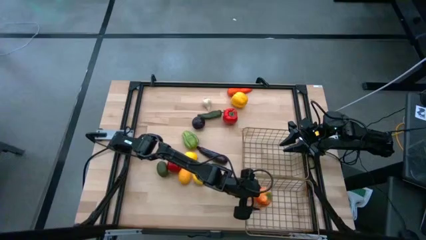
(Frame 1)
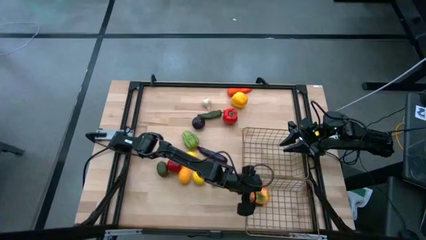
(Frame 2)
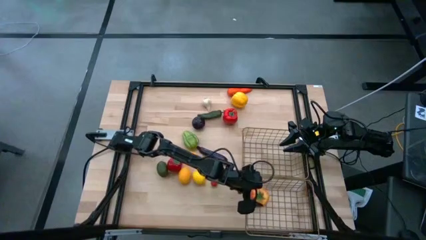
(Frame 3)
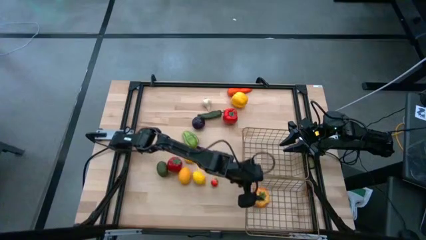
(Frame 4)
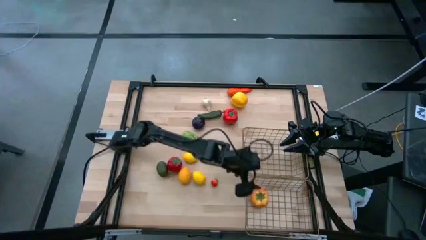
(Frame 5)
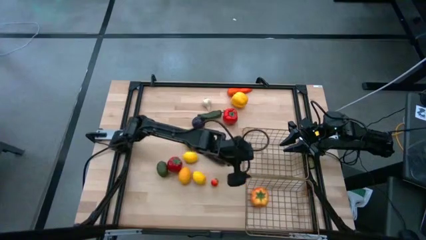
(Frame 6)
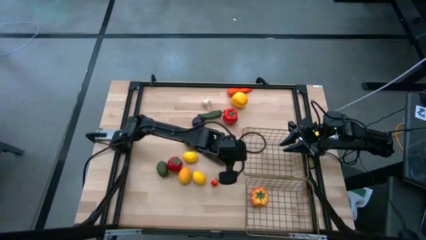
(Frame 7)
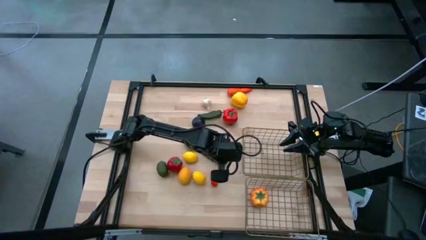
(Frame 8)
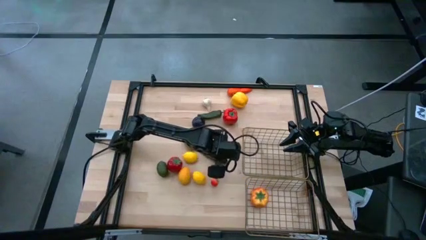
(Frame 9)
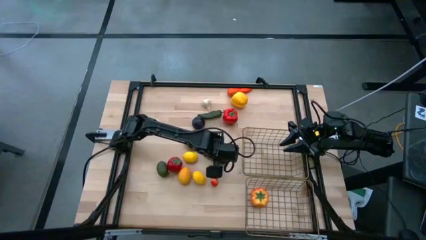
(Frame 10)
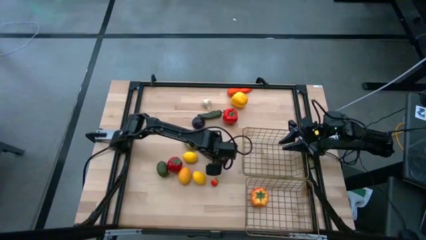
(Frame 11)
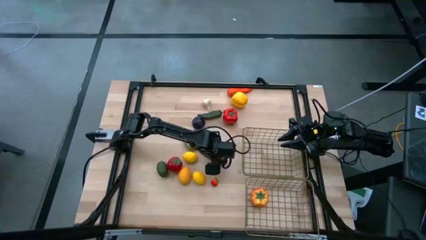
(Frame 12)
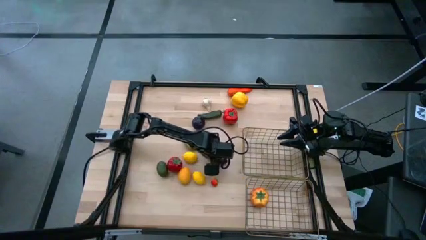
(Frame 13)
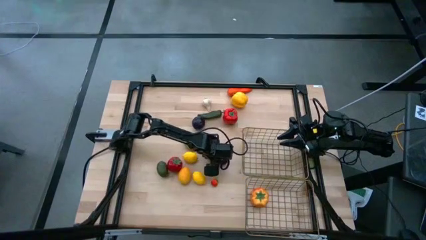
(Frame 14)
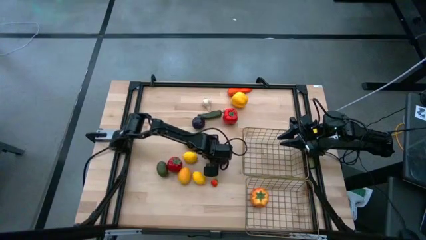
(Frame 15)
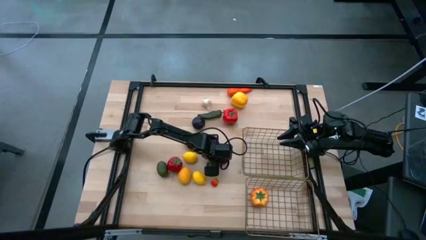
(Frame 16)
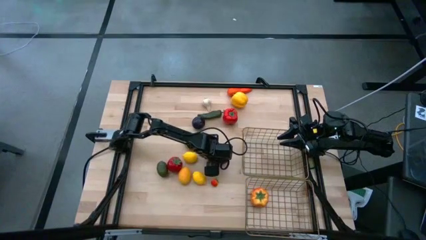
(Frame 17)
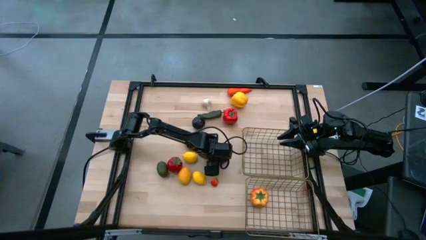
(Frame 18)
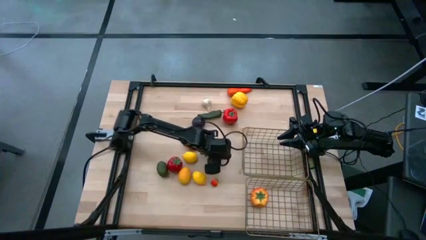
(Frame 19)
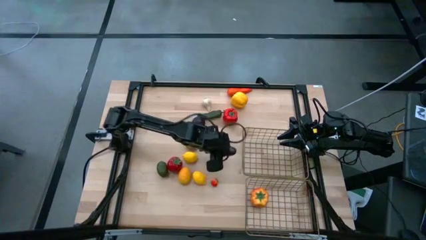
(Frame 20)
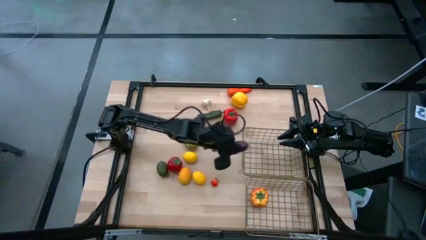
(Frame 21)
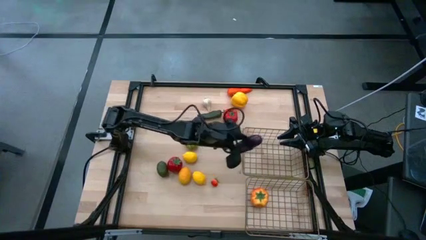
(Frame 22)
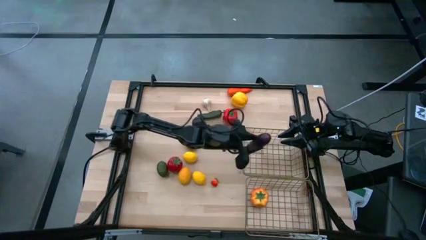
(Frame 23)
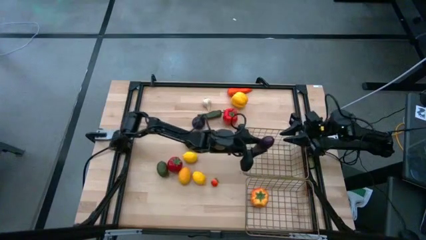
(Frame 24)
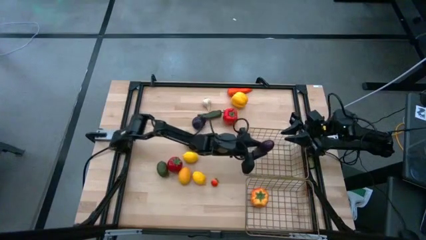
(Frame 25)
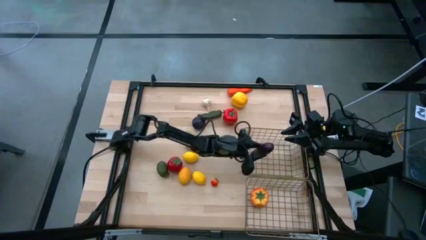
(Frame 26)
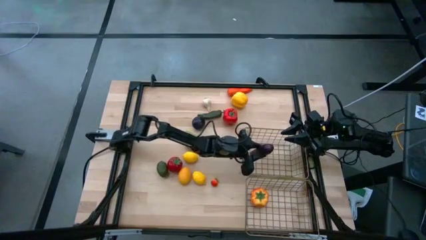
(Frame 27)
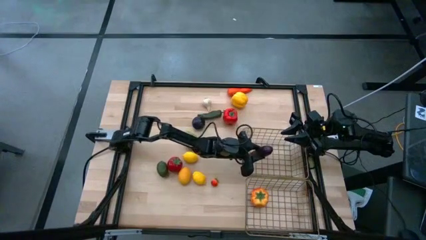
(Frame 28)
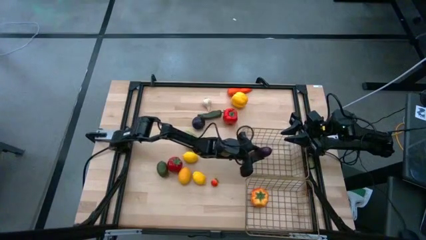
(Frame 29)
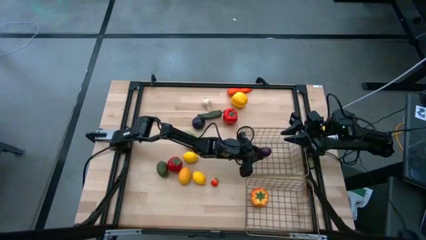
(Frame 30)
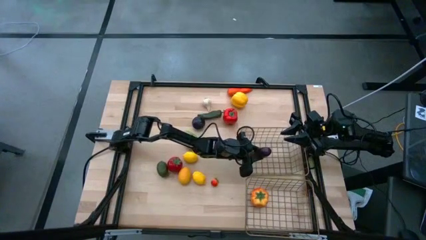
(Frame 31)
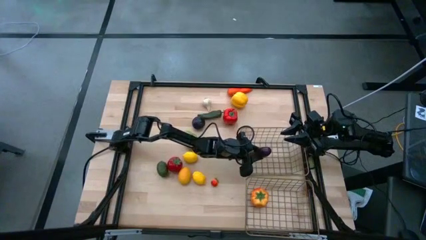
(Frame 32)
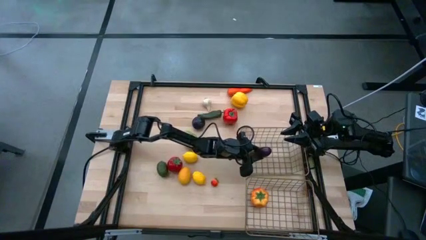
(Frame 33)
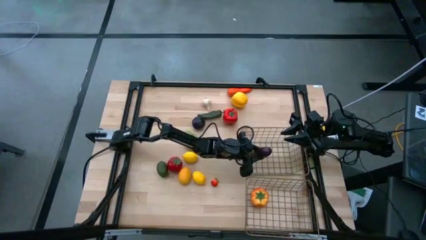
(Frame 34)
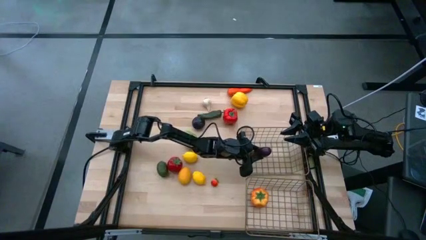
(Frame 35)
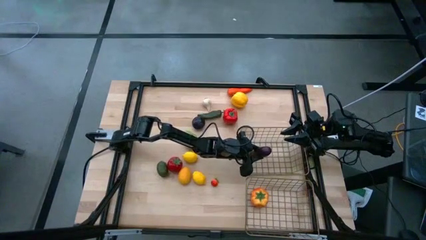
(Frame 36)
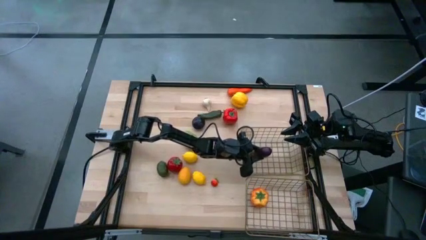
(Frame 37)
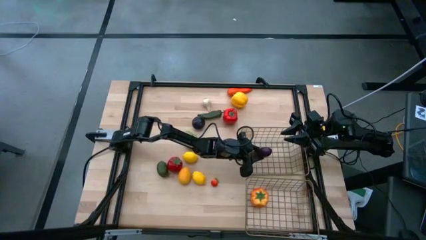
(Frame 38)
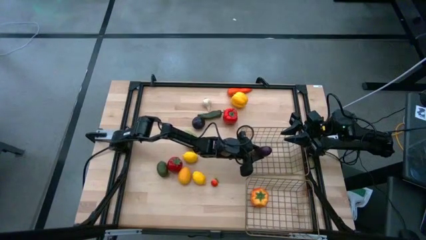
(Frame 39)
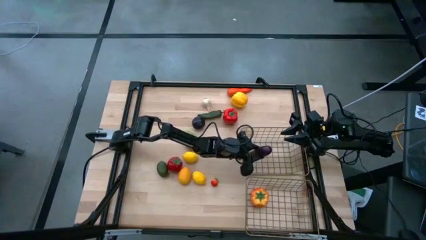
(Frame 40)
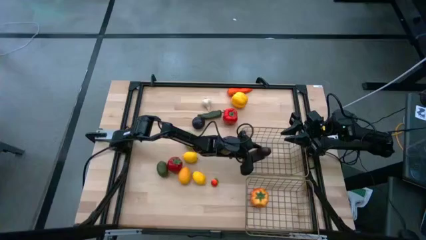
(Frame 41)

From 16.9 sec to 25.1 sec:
Task: Sort produce into baskets
Put the eggplant into the top wire basket

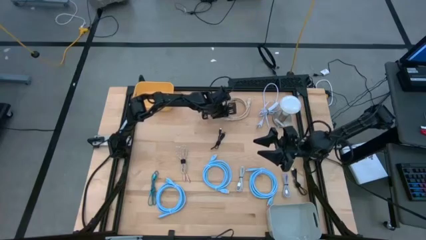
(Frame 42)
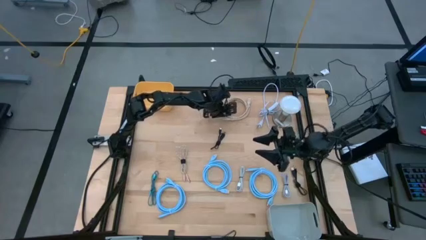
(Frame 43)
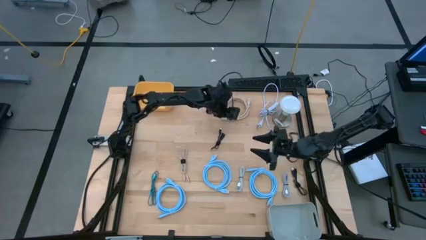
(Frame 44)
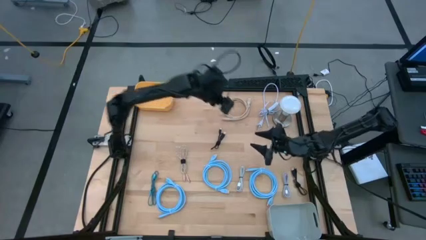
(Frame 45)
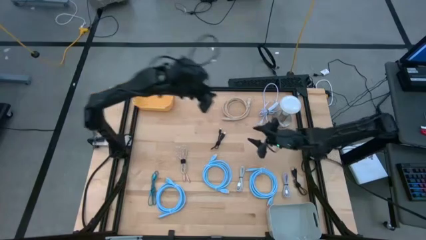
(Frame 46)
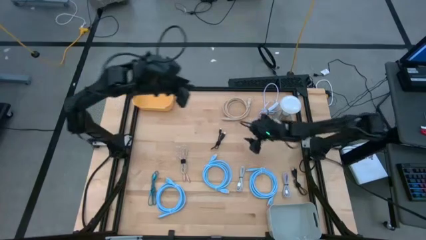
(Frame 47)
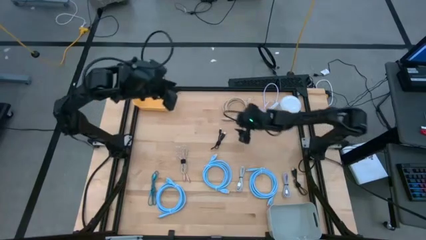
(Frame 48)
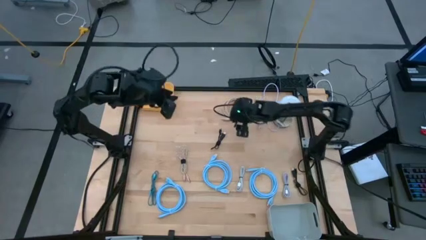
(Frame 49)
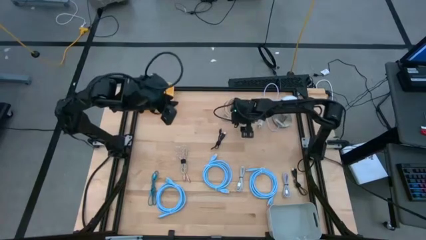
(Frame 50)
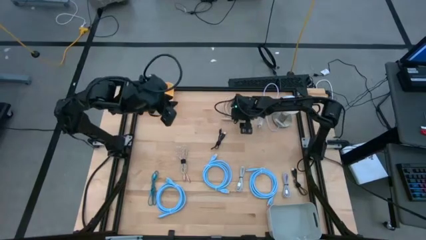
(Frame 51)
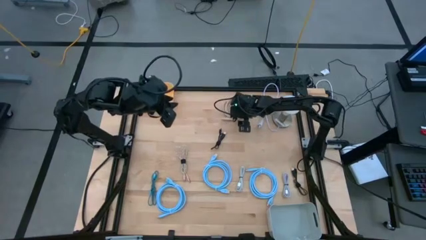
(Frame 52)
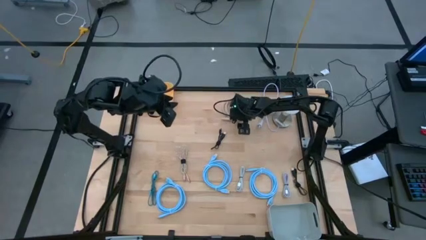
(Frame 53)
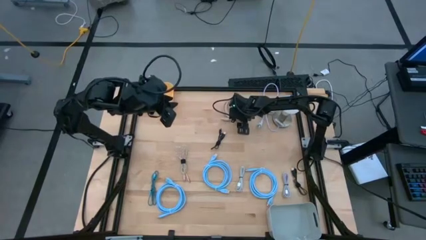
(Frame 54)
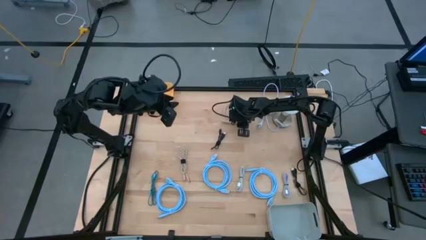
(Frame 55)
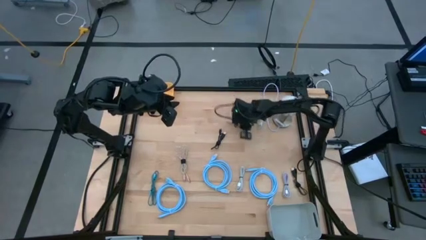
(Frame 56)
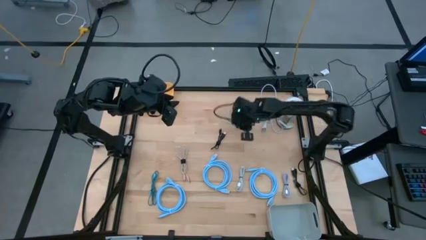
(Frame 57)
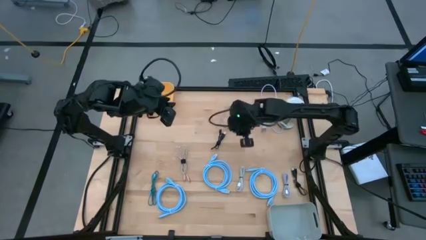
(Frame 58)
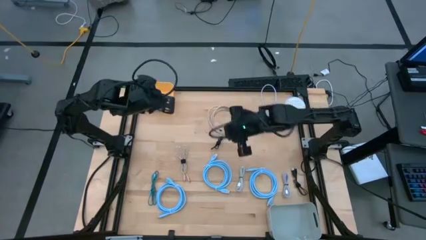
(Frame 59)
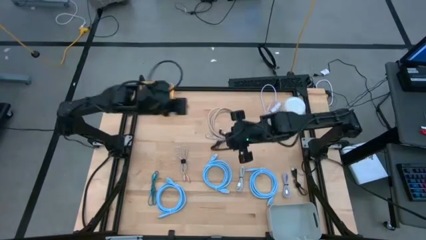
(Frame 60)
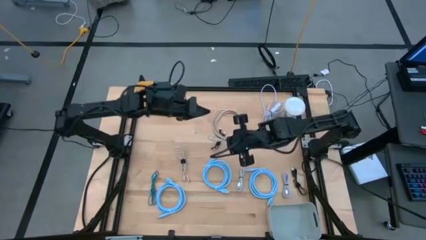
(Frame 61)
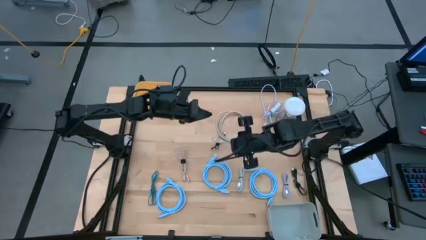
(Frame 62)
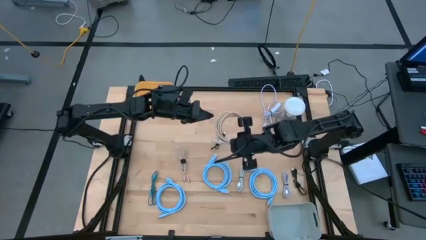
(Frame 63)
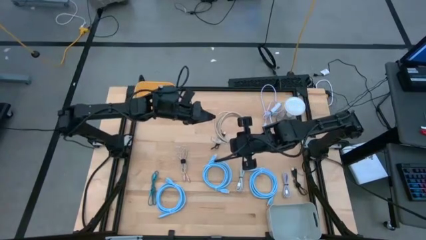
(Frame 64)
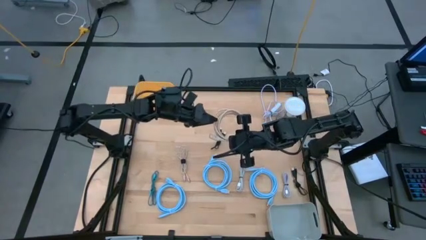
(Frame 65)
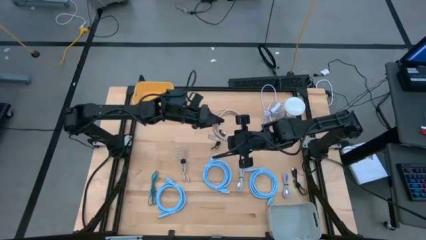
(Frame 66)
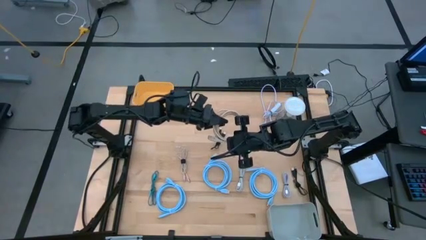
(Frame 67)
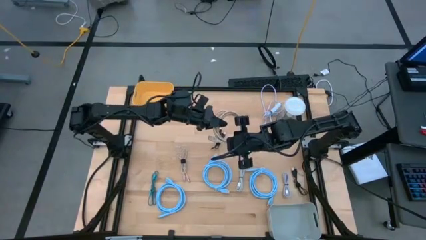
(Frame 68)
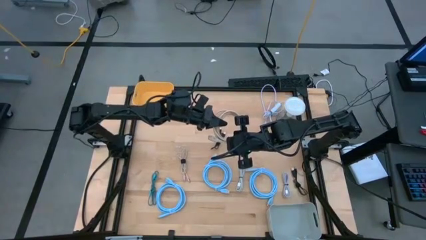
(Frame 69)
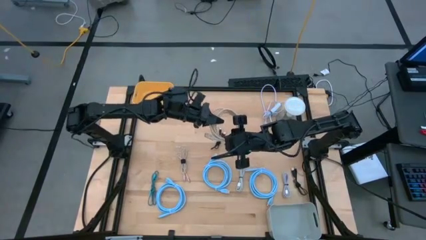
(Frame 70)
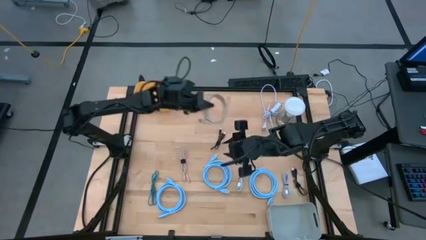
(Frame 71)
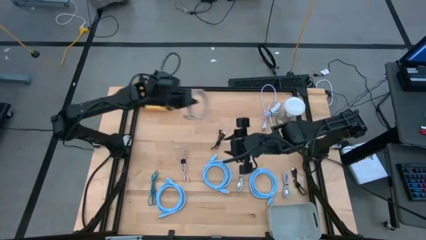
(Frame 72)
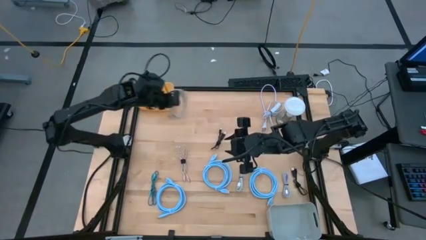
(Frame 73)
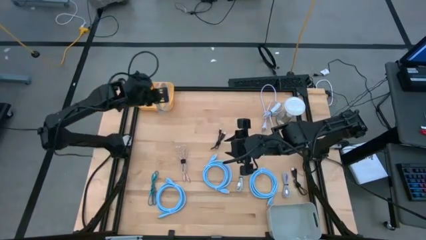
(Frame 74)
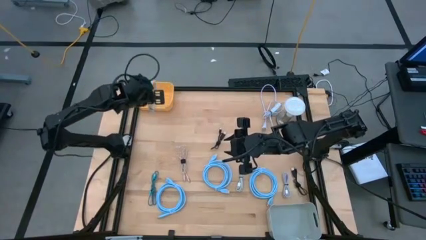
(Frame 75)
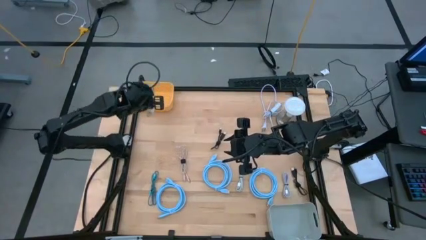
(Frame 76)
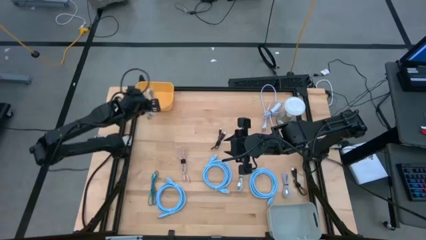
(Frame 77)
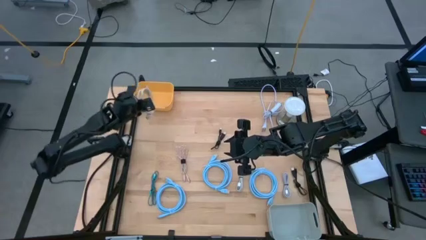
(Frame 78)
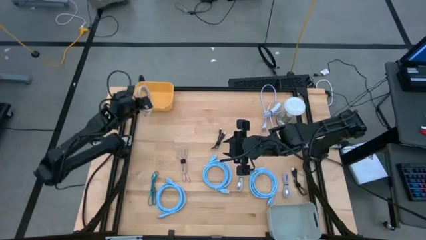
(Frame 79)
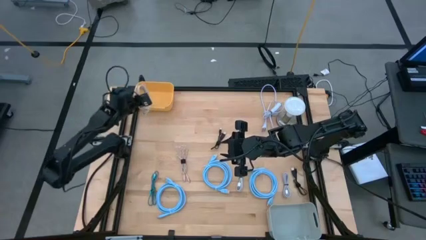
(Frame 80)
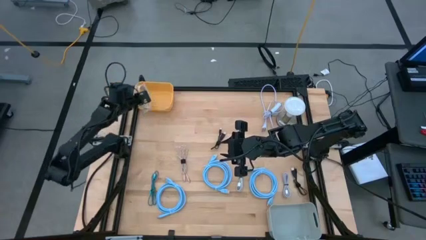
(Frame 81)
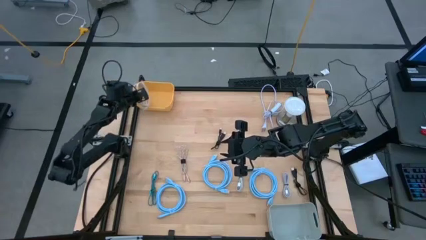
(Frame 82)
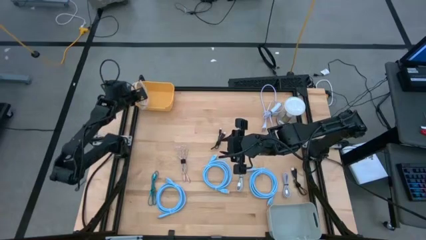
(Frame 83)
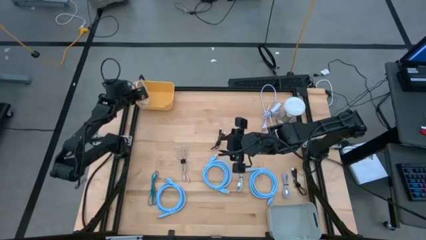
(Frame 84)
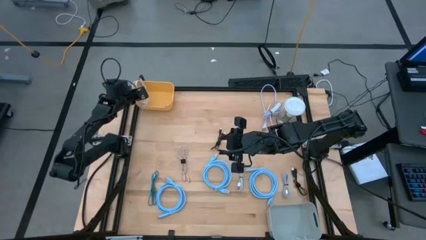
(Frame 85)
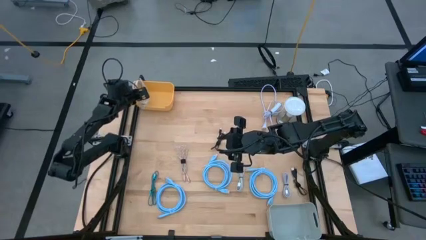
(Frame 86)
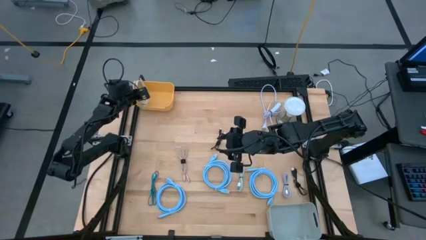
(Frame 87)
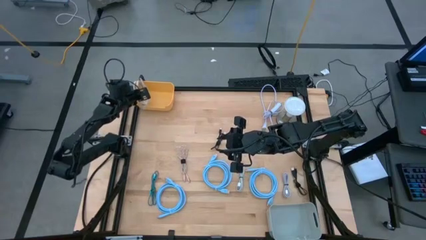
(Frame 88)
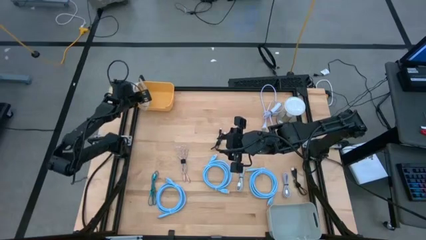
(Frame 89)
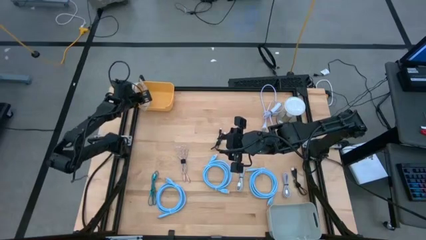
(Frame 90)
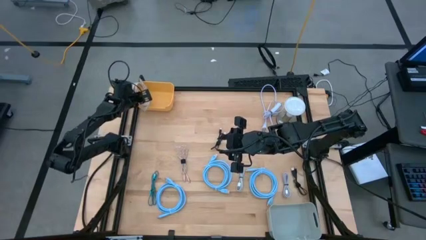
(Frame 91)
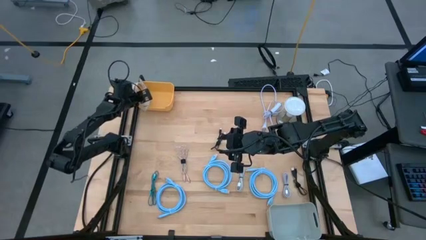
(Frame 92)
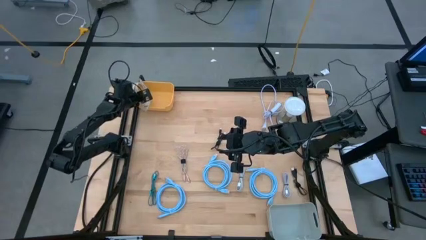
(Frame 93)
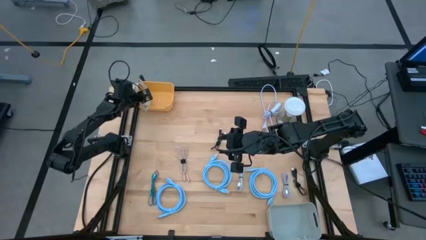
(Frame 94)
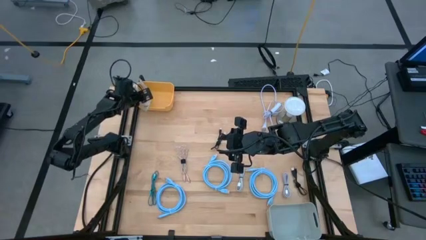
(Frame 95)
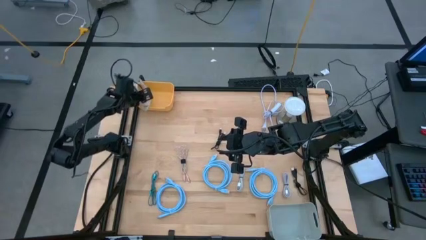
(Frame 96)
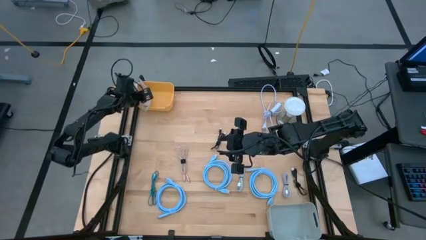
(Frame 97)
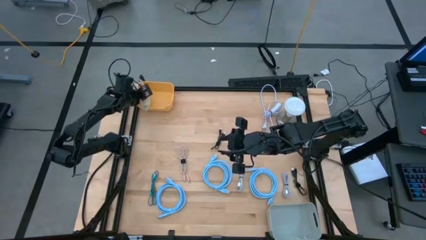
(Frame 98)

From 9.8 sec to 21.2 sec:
Task: Pick & Place USB Port
Put the gray hdmi cable into the yellow bin
